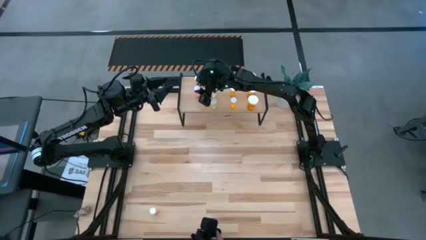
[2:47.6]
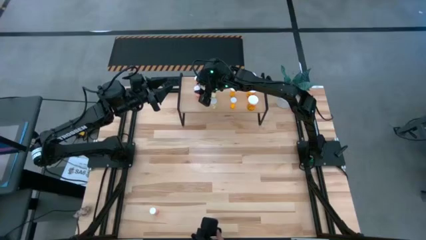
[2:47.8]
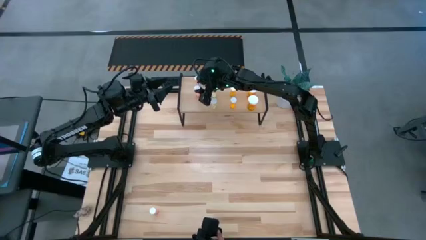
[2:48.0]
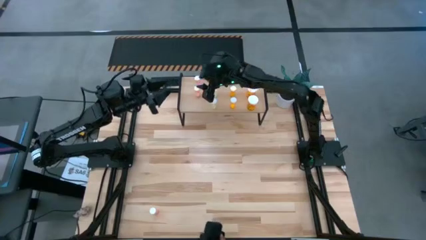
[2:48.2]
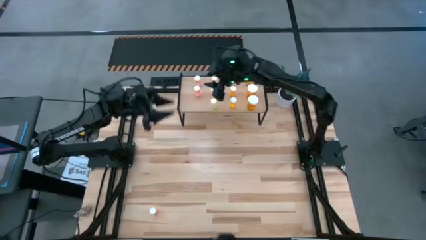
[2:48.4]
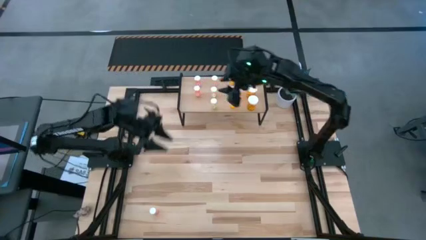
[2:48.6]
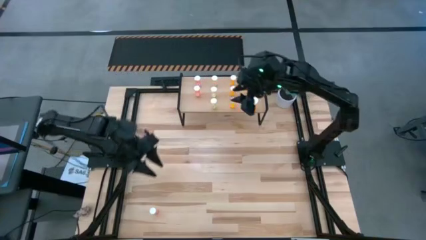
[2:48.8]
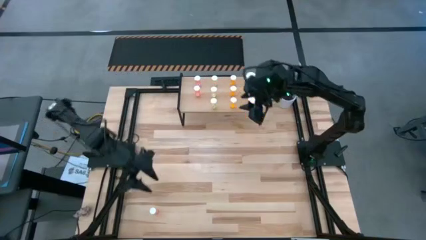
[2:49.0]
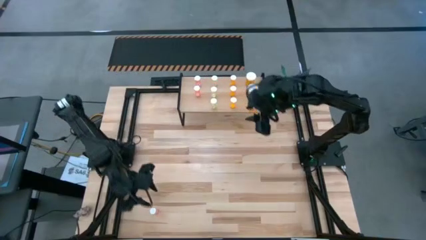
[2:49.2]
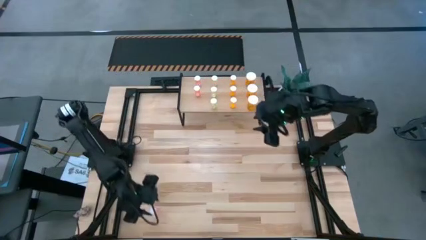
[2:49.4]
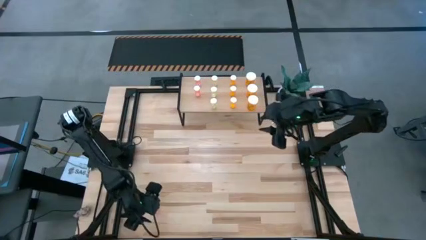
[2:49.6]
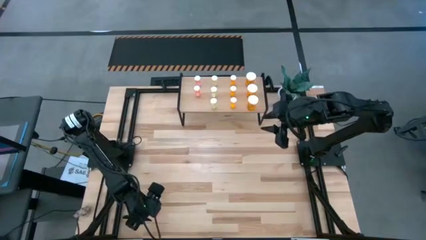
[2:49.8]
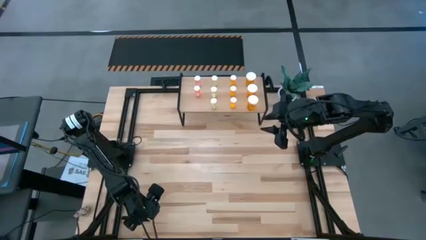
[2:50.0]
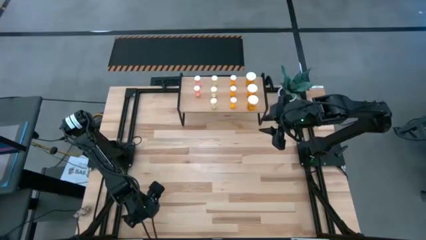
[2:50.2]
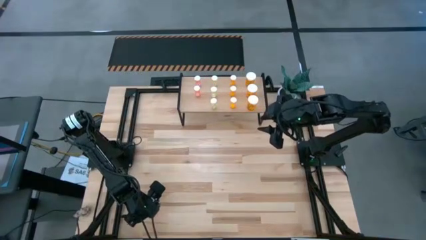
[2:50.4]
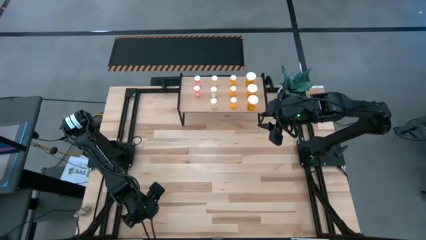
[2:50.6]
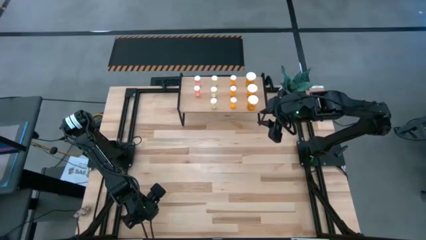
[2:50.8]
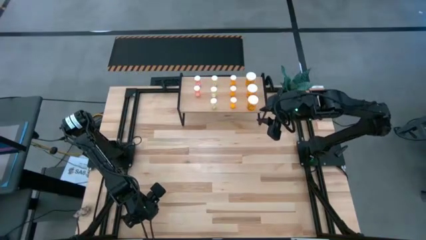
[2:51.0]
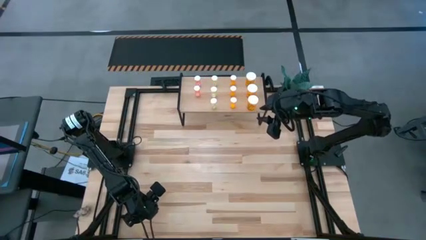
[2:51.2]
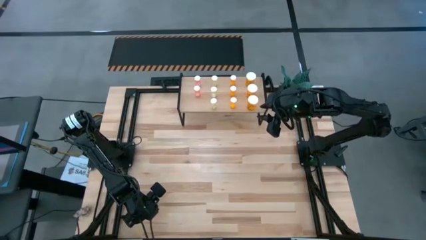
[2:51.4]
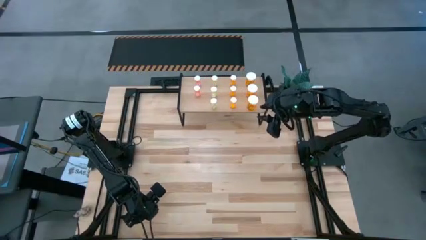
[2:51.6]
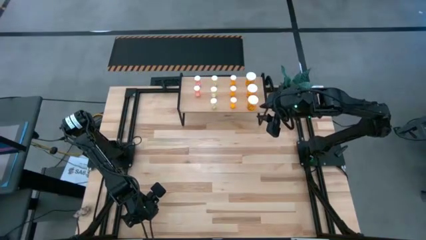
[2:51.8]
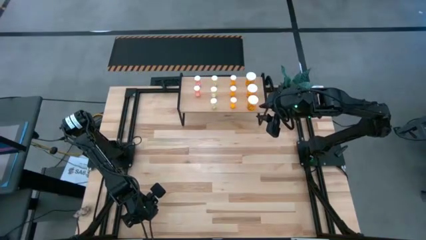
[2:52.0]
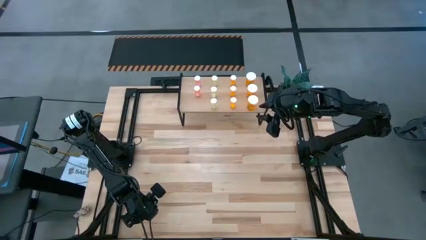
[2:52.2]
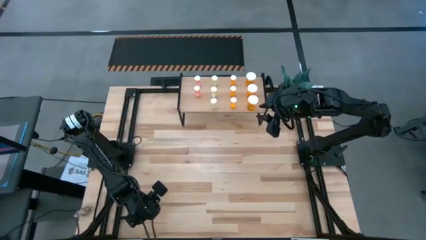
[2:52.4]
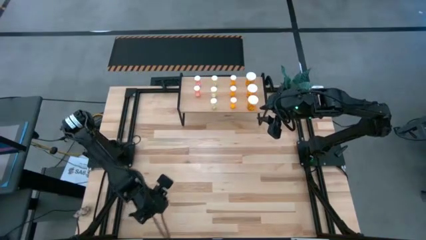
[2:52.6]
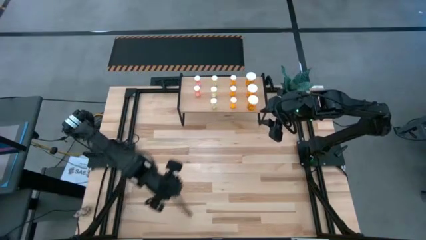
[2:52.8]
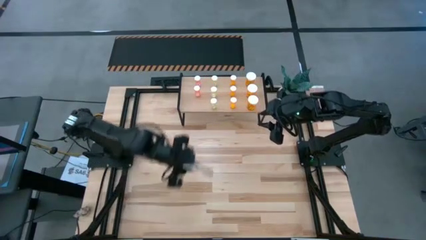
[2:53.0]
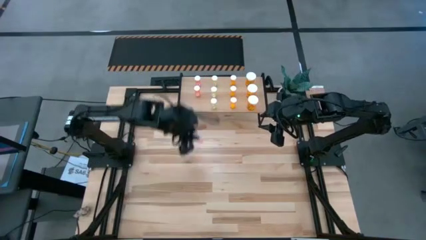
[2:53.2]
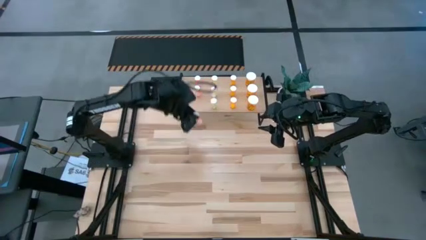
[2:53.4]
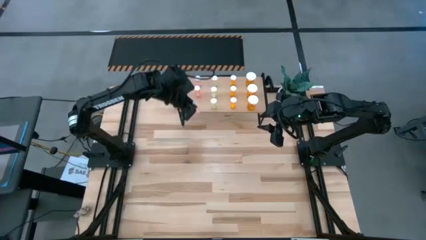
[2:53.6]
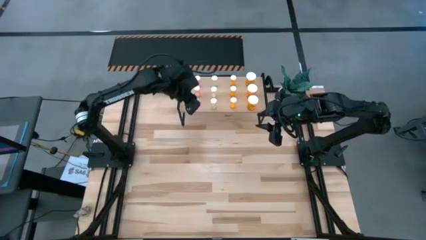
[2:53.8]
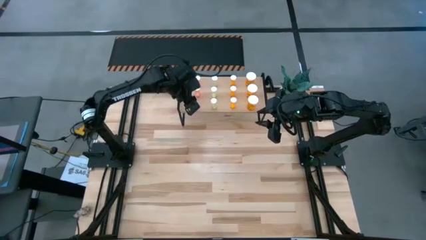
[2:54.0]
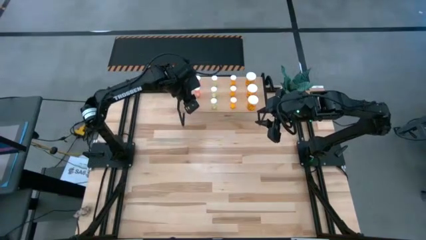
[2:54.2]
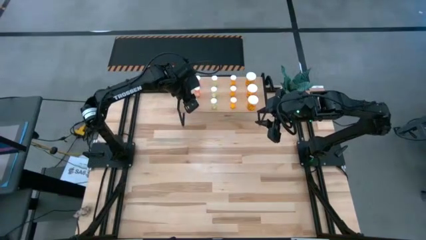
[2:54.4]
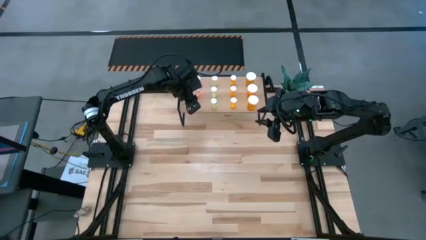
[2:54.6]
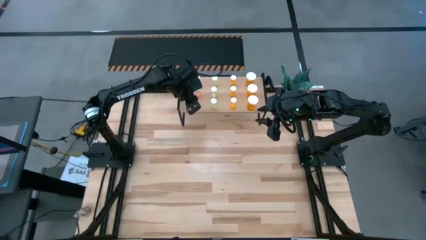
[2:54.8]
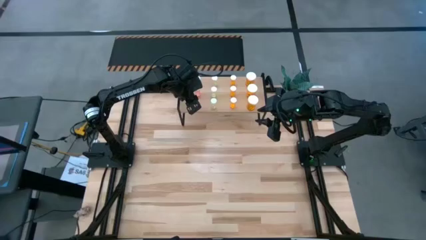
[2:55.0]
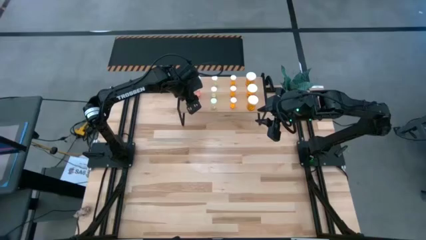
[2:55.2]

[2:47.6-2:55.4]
Task: Pick and place medicine bottles onto shelf by color
Put the pink pill bottle on the shelf aligned with the other small pink pill bottles

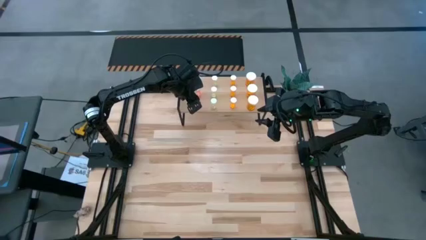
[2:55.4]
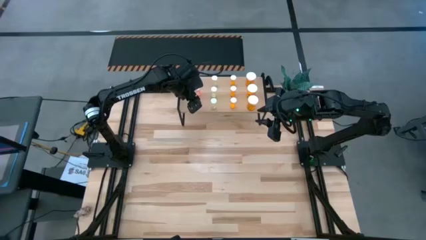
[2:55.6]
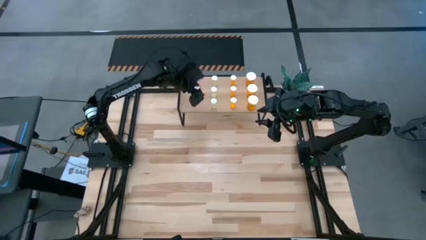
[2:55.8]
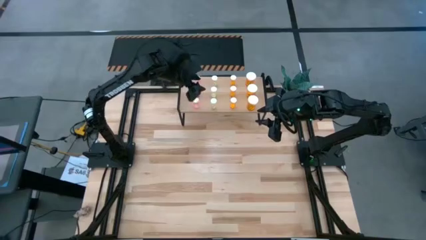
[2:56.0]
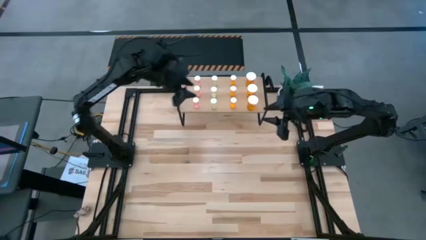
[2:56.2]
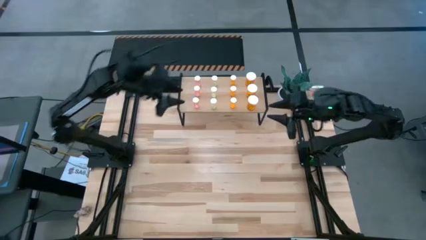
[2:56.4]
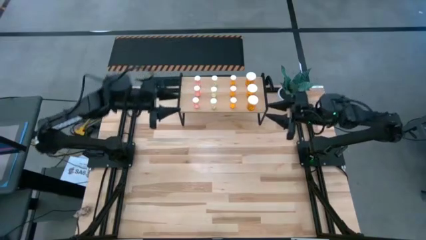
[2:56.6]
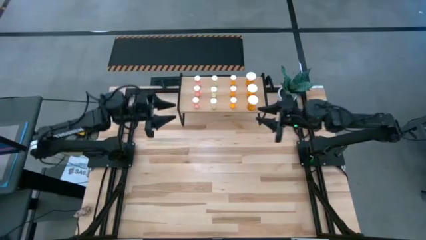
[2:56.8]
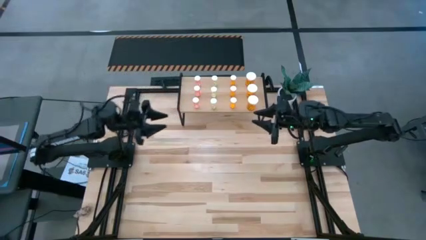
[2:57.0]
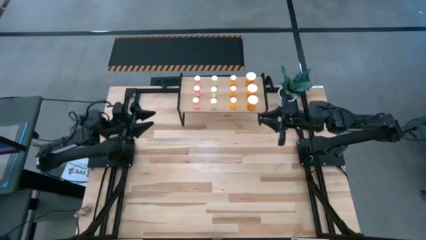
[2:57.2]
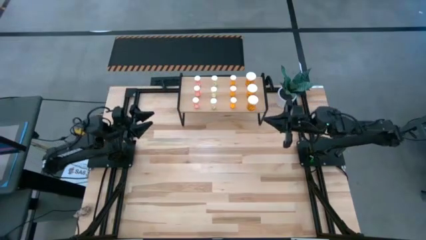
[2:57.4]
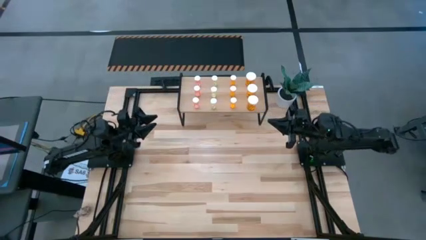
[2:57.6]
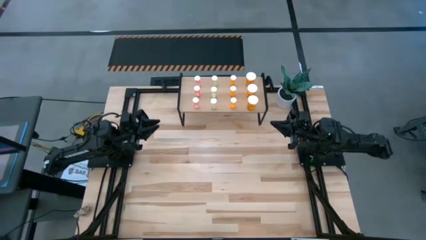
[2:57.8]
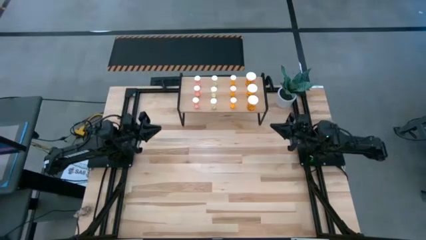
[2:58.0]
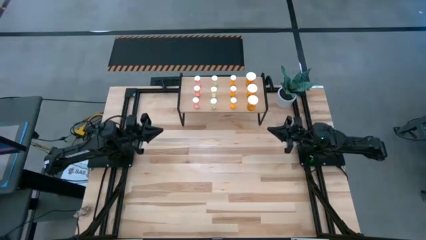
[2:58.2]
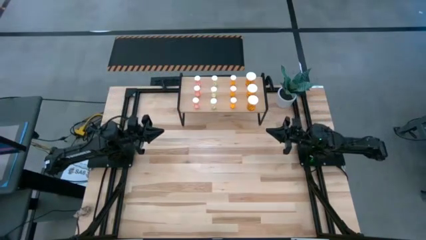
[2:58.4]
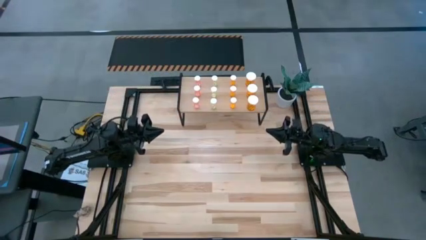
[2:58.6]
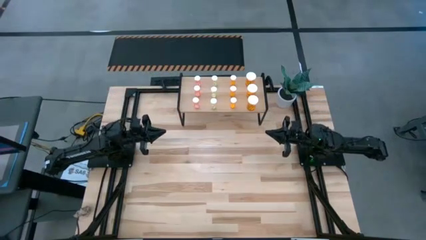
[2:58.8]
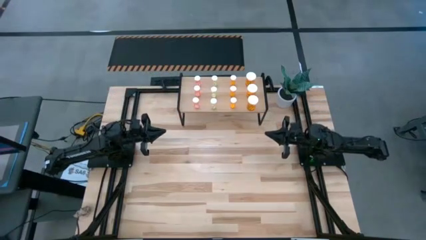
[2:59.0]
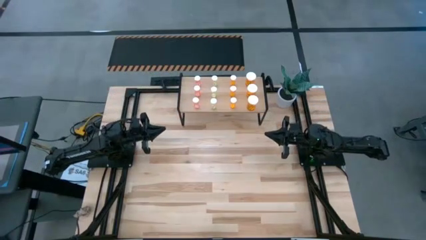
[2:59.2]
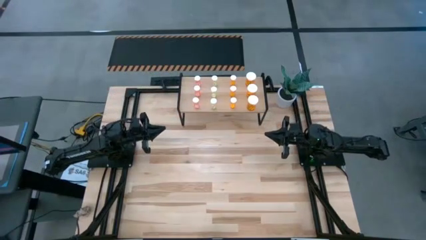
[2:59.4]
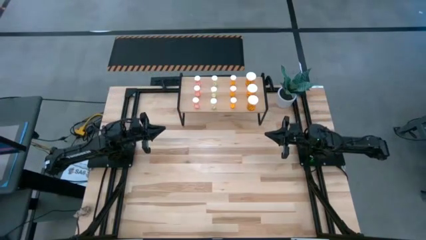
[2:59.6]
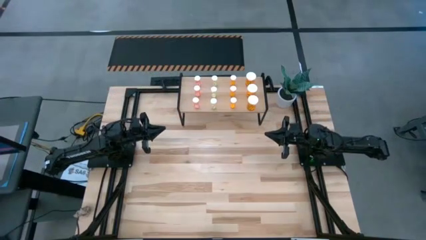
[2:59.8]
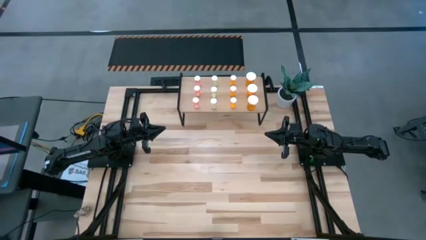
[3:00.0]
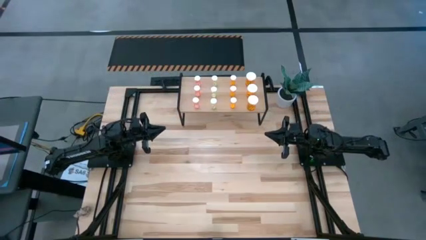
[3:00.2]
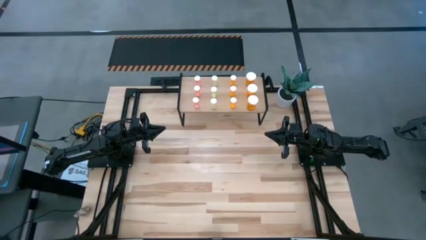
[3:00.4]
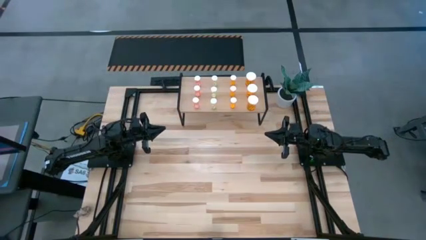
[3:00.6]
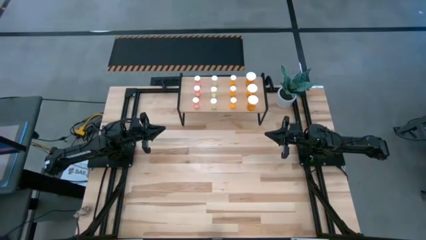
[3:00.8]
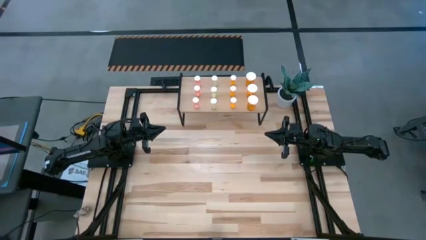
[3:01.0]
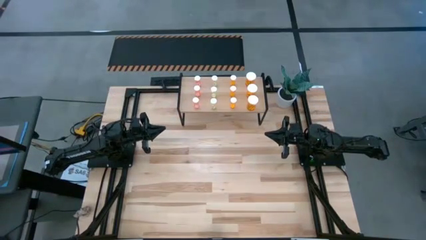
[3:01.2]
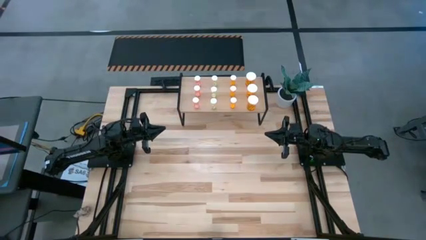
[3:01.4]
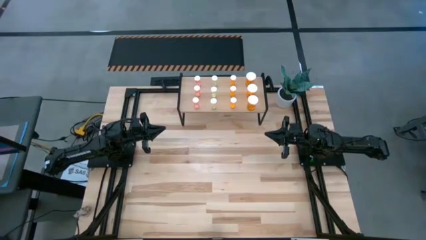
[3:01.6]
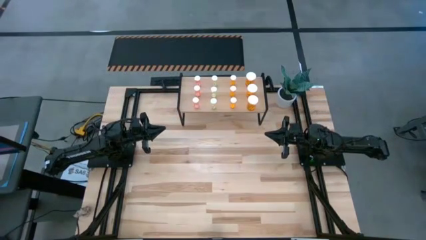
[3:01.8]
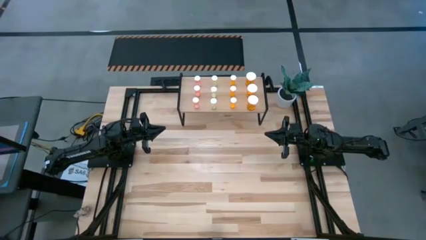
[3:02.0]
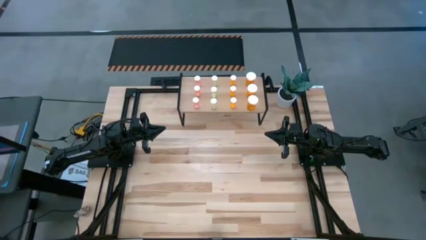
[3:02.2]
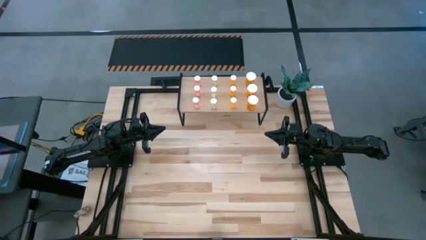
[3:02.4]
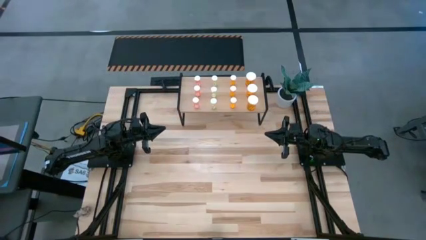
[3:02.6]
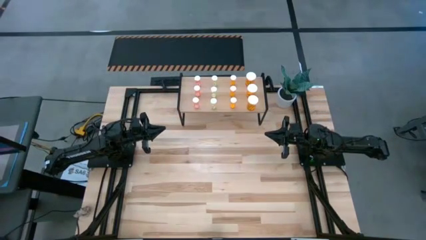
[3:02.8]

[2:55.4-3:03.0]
Return to Home Position

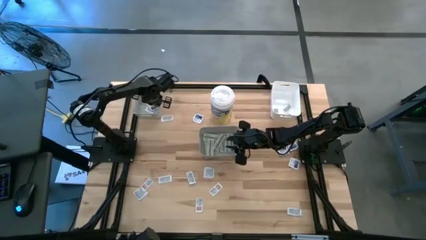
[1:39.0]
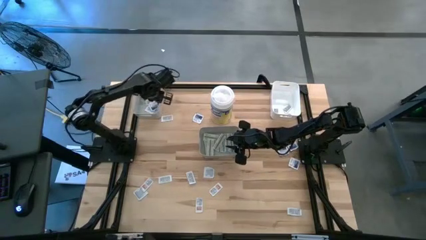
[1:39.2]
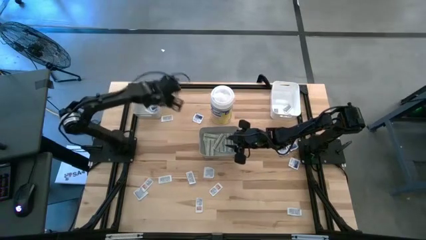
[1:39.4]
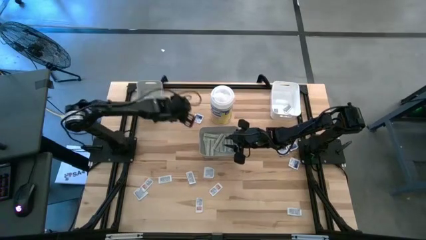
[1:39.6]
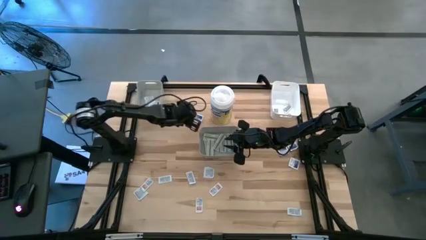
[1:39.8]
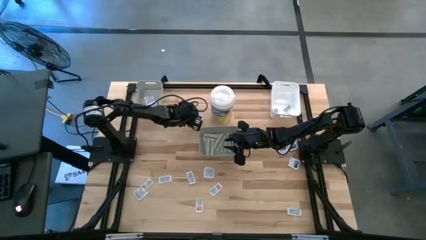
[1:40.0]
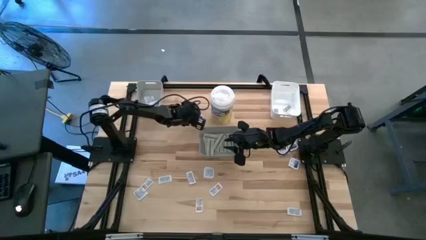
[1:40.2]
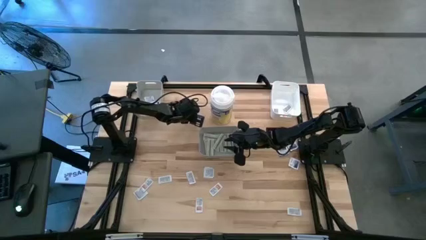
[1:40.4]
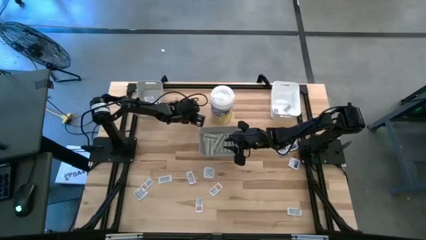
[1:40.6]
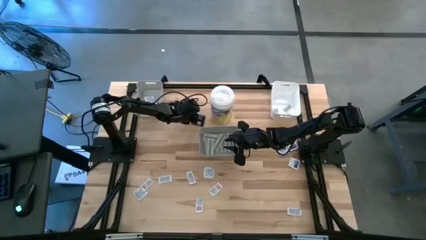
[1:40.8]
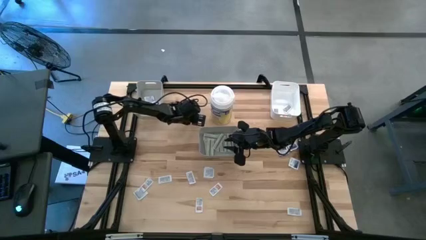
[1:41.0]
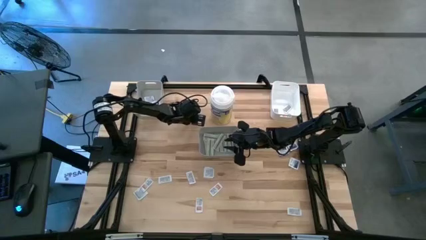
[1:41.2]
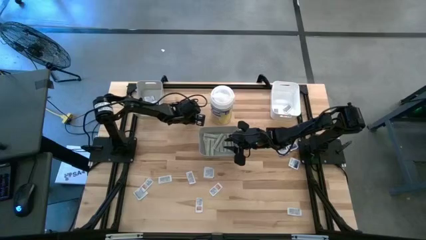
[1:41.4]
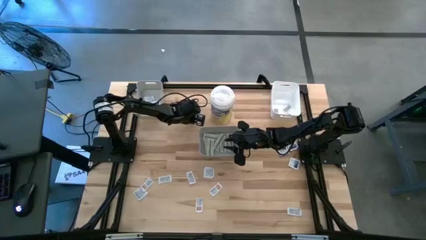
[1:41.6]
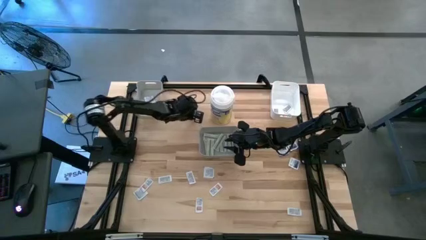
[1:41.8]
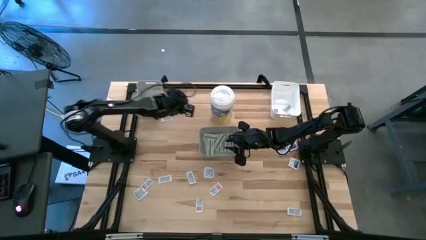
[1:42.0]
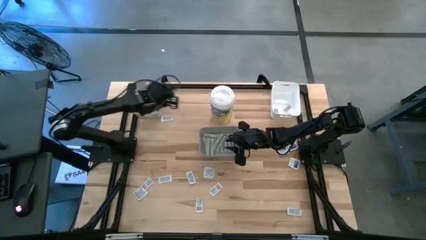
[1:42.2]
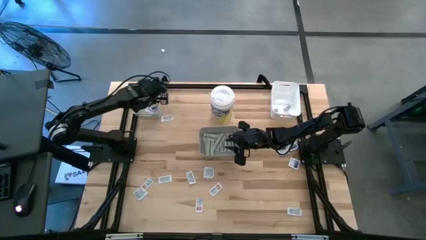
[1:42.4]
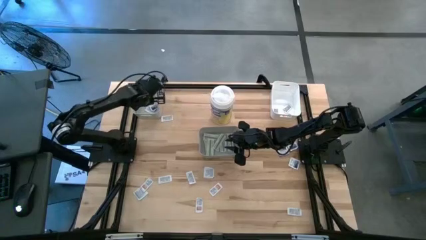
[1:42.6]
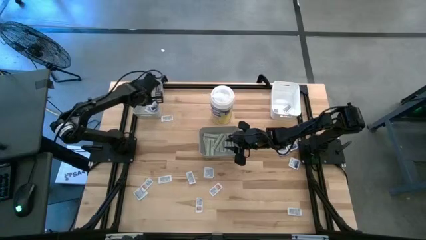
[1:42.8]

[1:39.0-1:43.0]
Task: Pick & Place First Aid Supplies
Put the alcohol pad into the top gray bin
